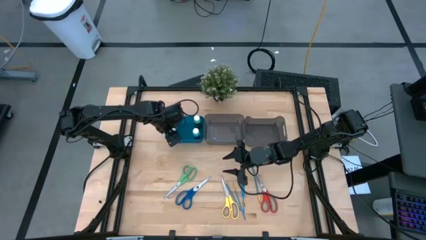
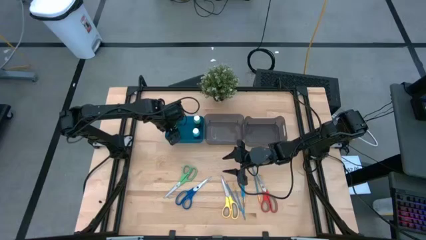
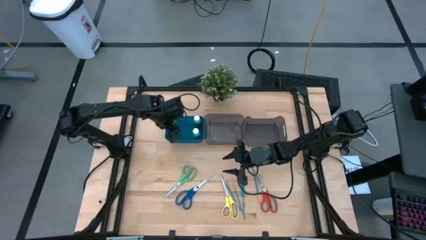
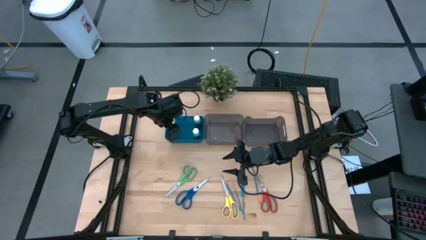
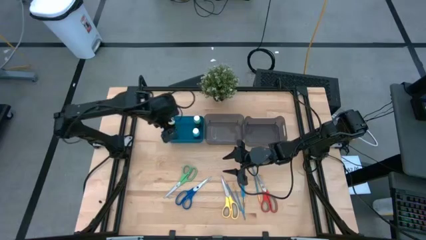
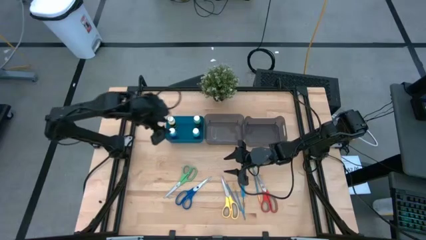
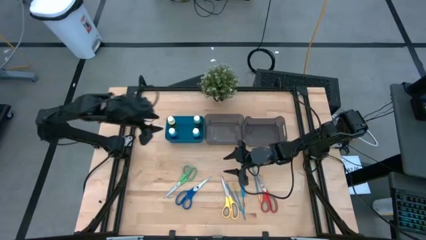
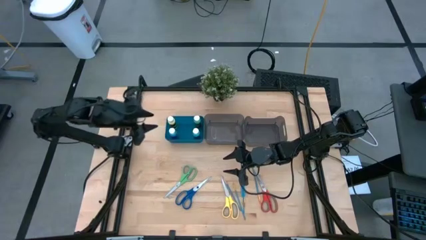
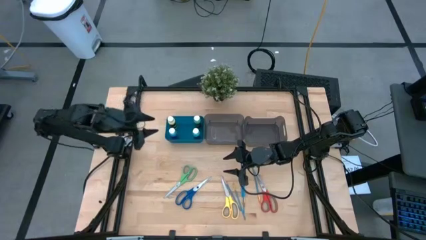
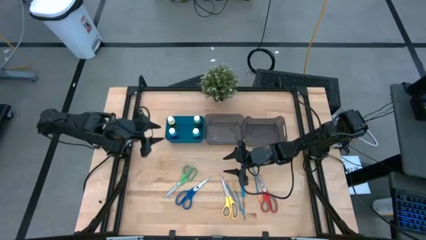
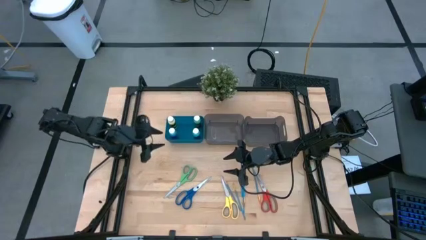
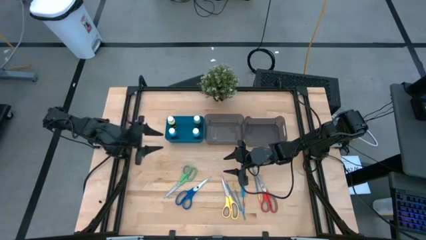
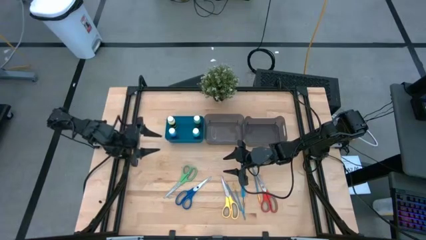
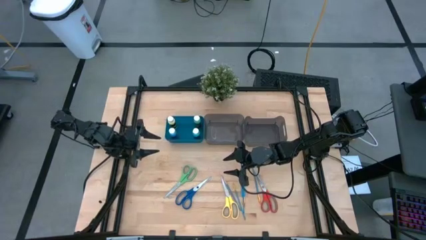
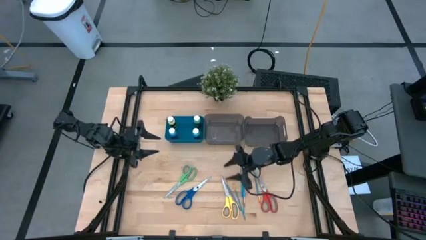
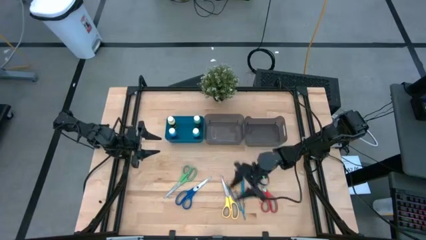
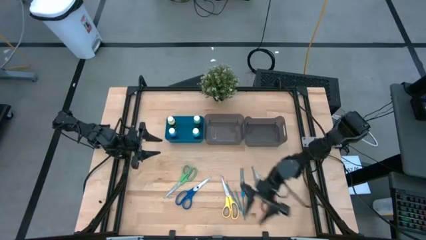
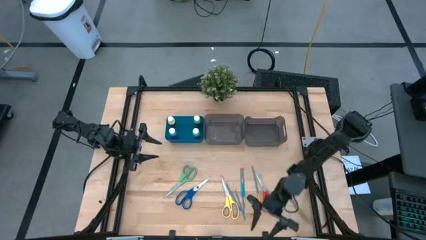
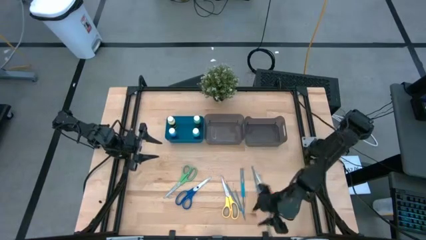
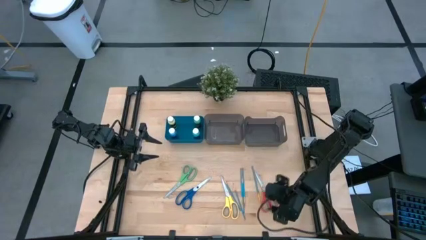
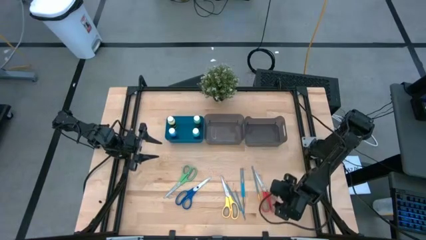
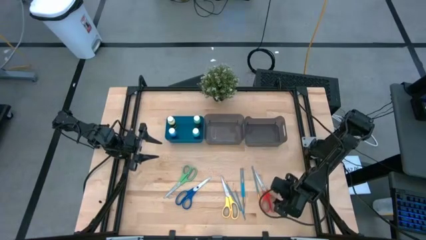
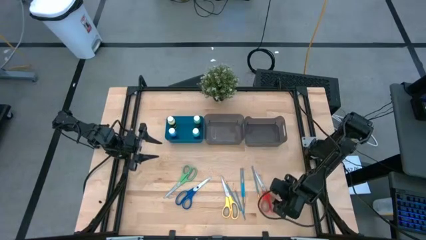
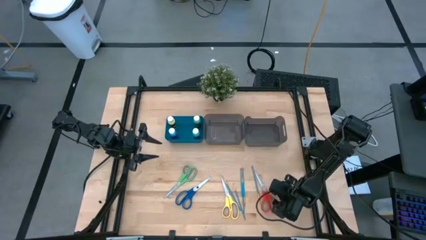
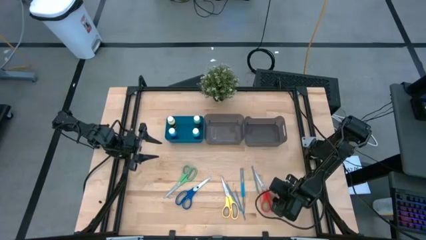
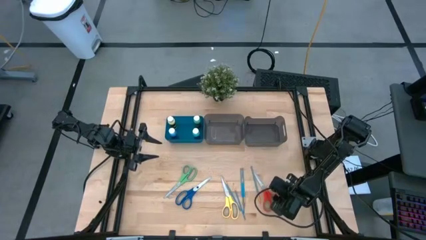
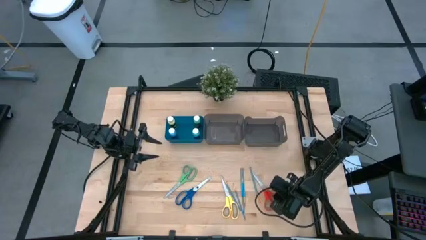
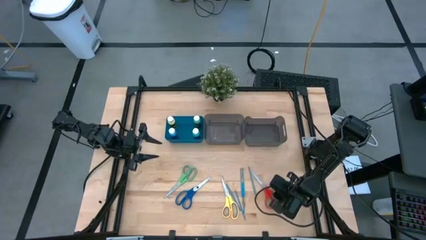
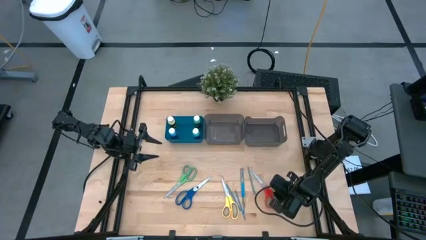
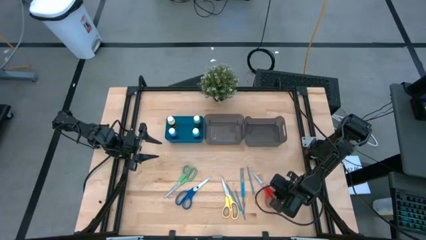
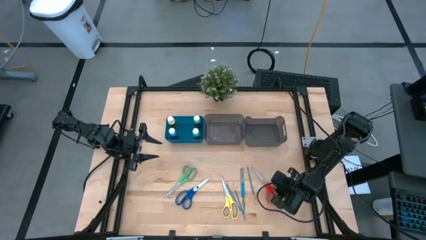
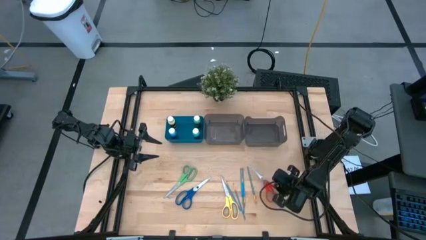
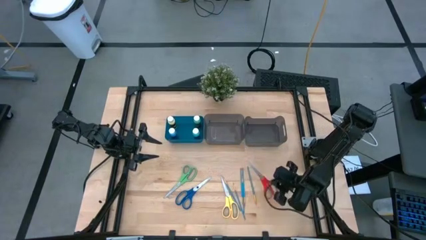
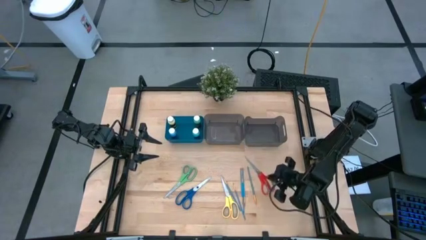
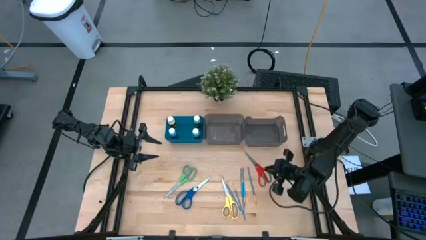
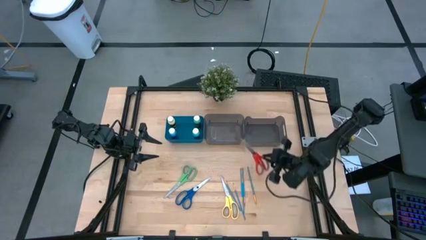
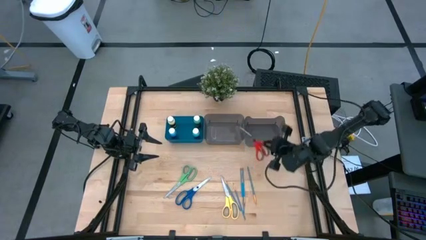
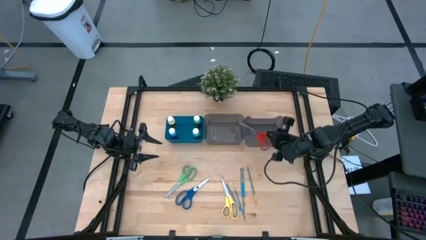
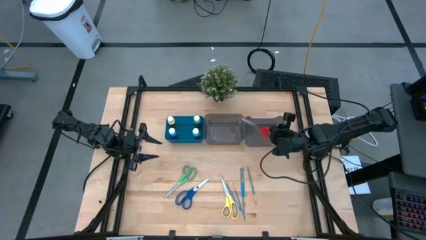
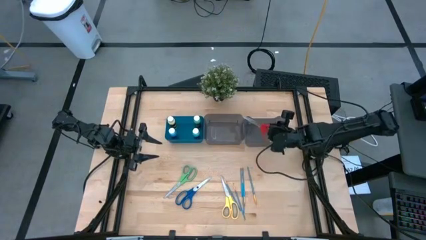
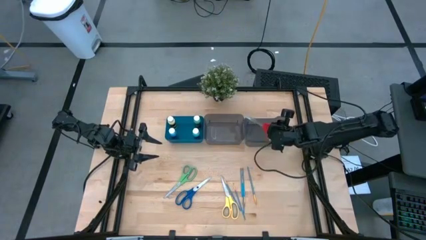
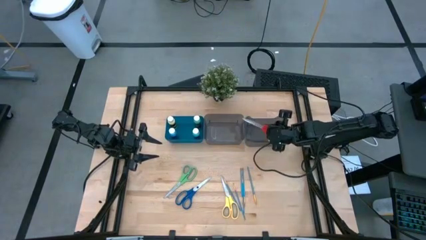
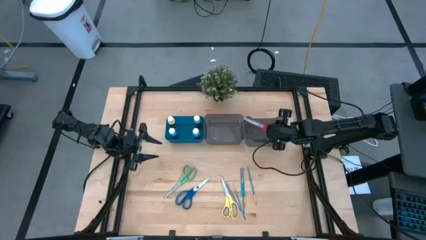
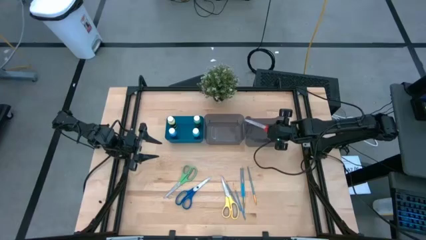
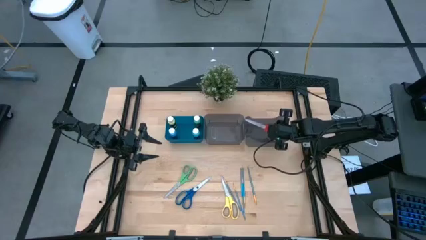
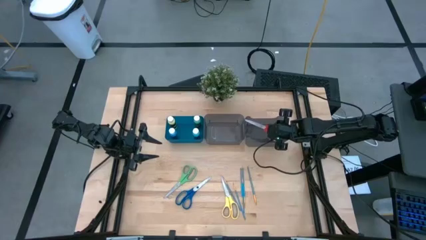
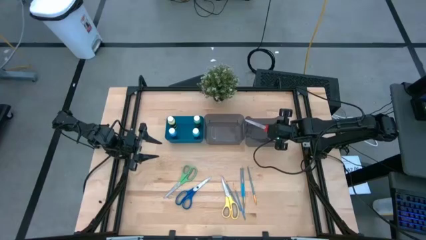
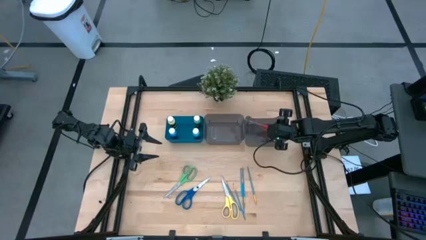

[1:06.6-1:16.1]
Task: Pick & Place Paint Supplies
Put the red scissor into the right black bin

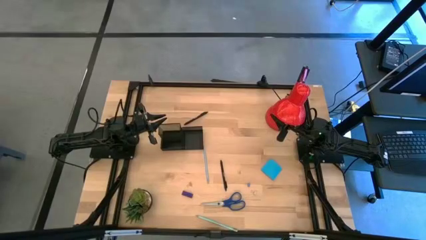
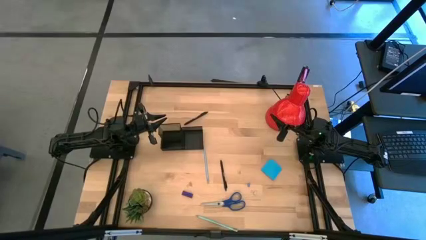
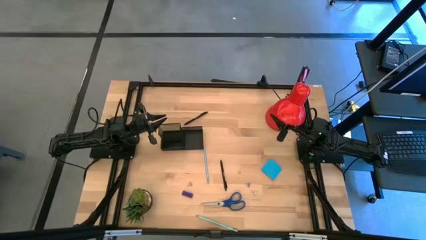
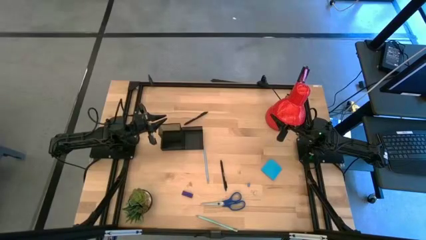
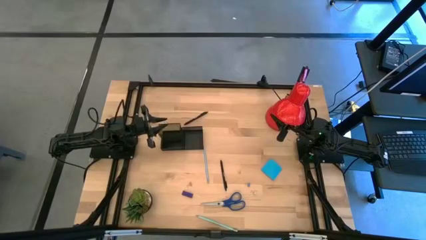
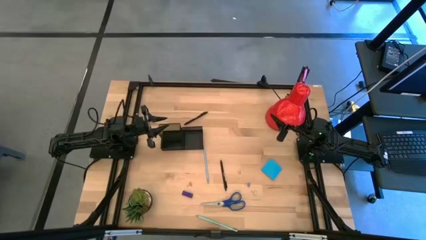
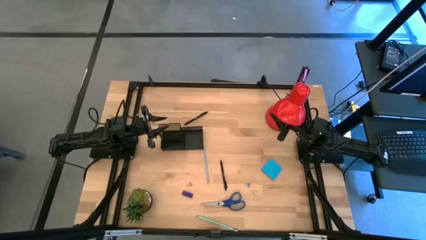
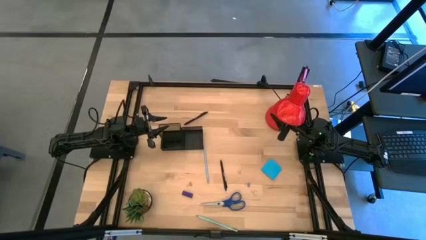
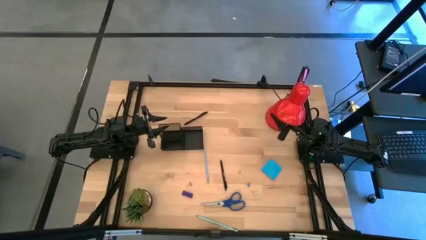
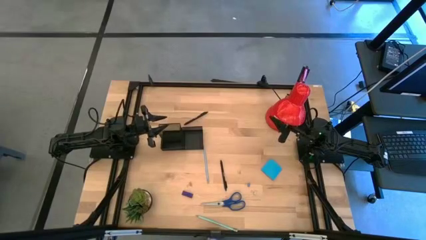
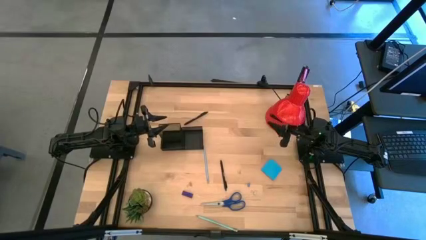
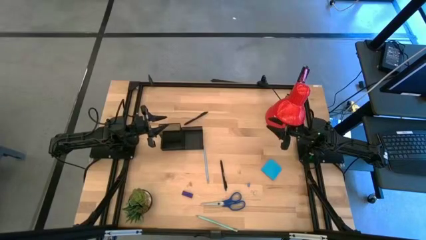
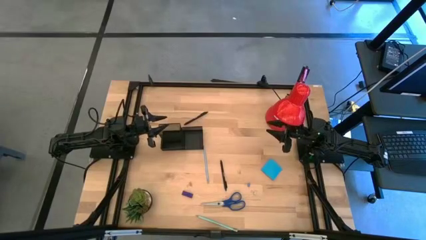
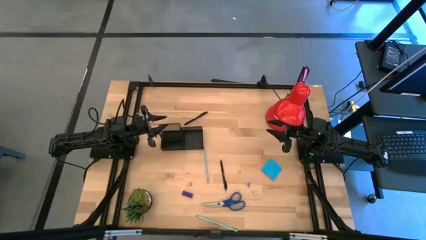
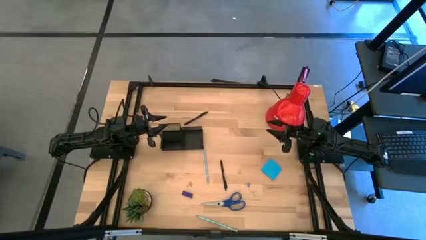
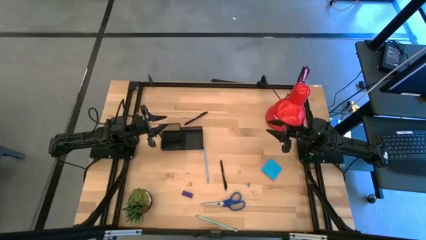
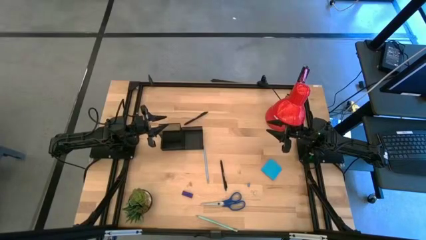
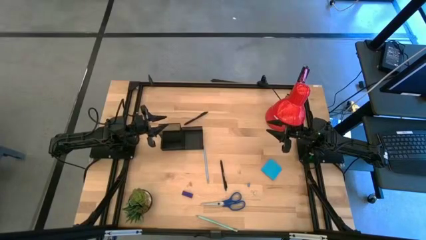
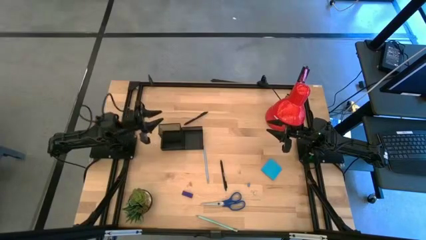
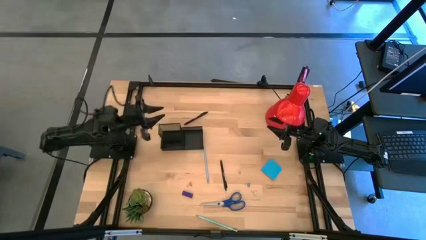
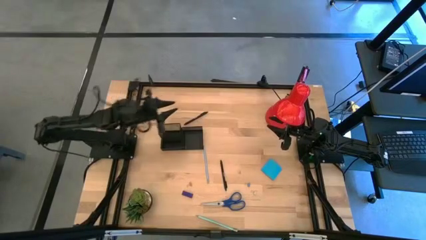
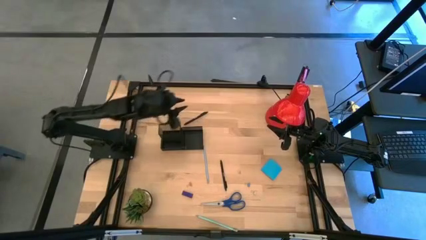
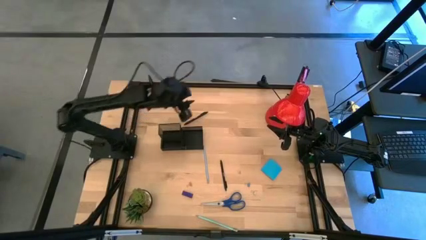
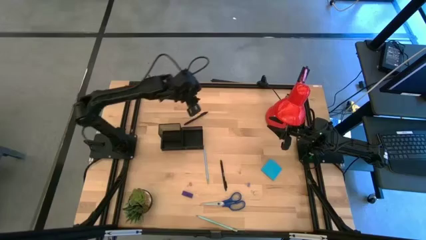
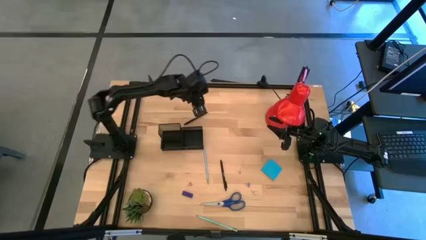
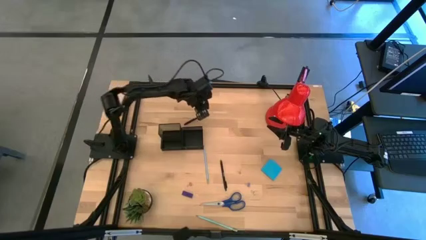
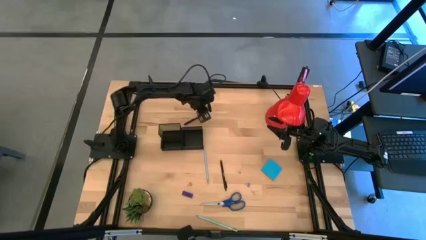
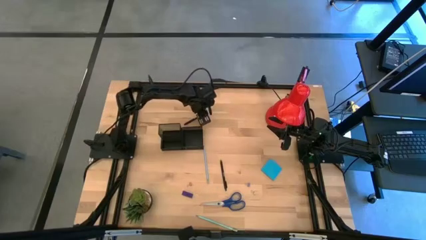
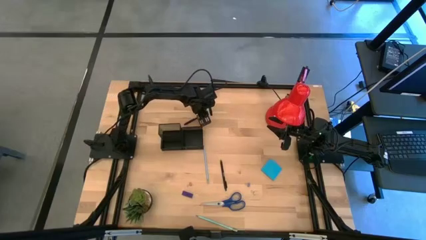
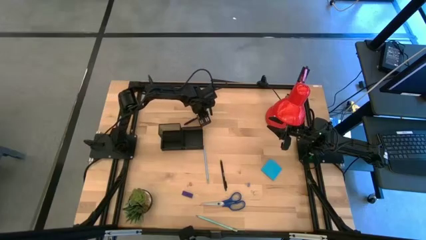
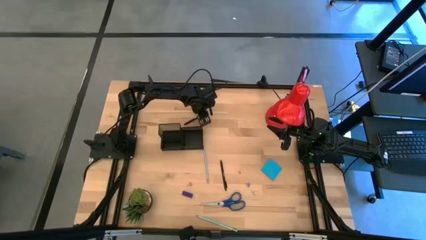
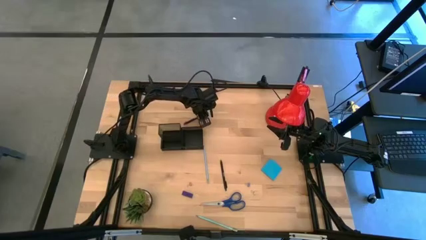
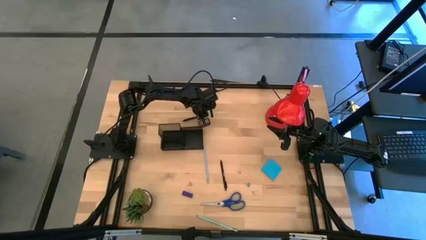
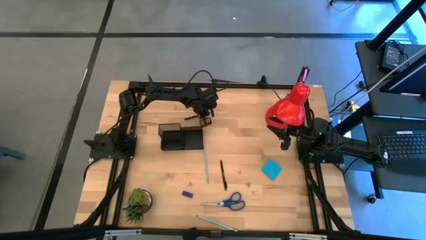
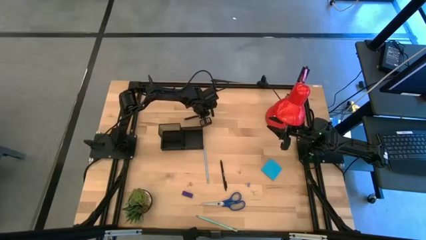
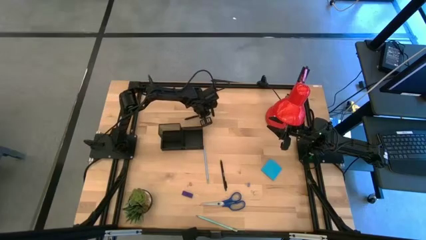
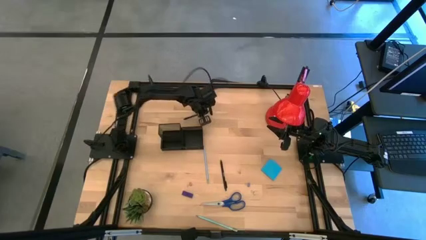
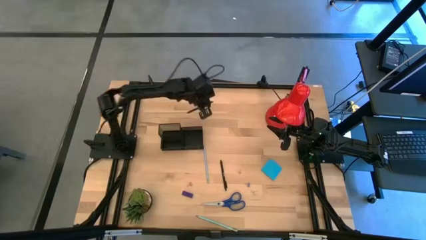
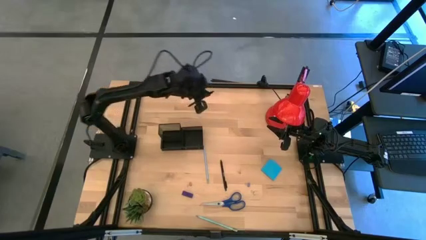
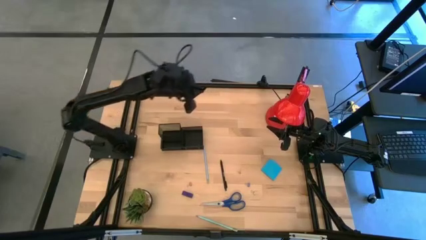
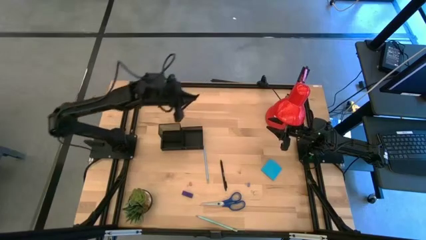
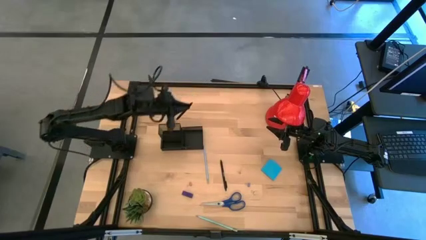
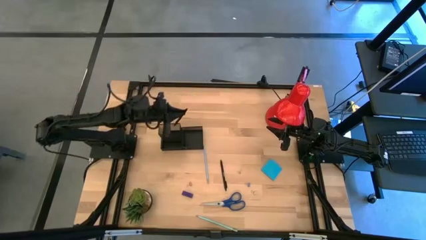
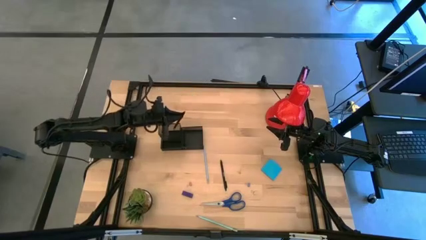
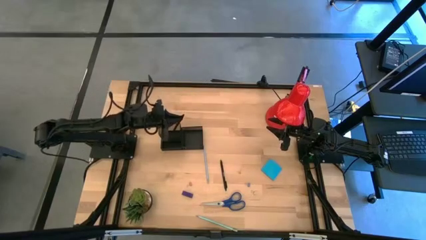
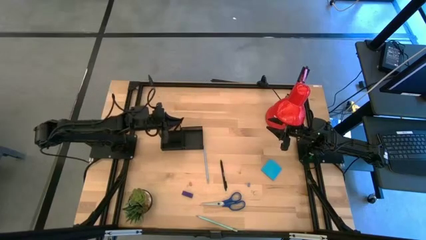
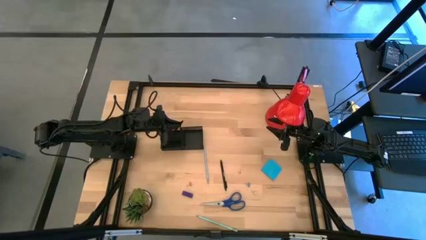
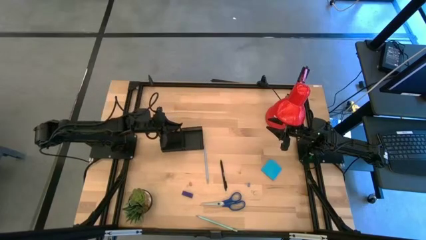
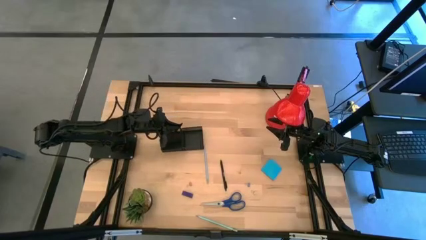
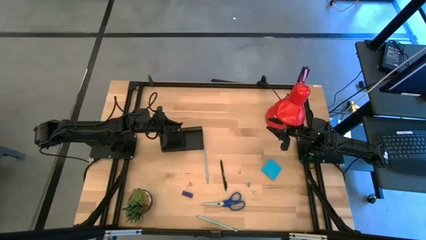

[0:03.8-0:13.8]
Task: Pick and place office supplies into organizer
Put the top black pen into the black desk organizer
